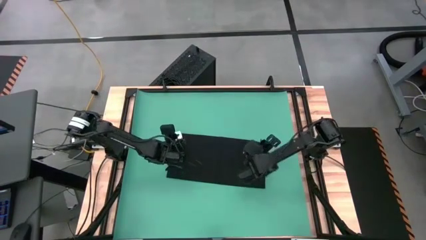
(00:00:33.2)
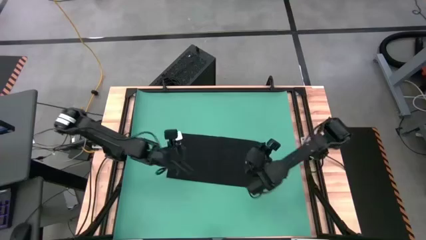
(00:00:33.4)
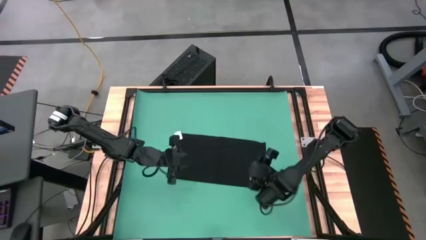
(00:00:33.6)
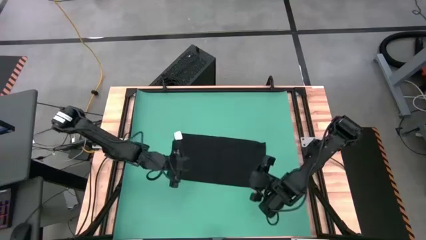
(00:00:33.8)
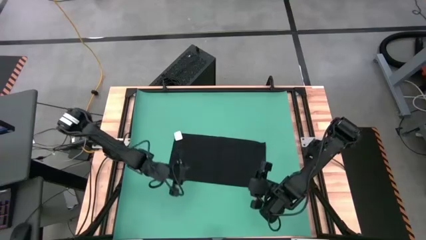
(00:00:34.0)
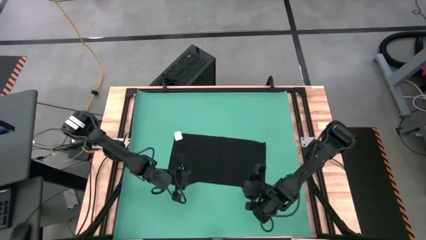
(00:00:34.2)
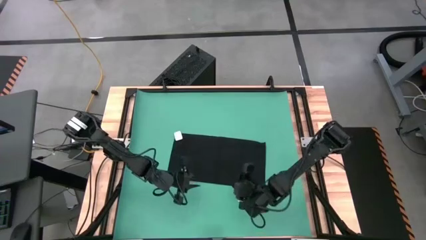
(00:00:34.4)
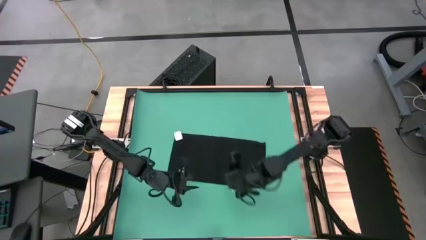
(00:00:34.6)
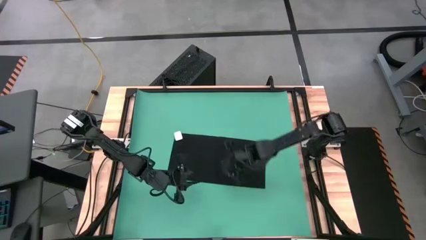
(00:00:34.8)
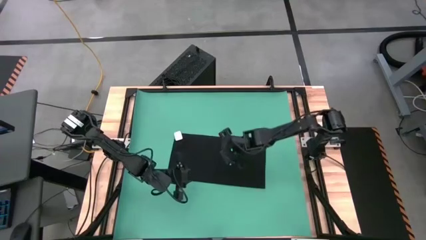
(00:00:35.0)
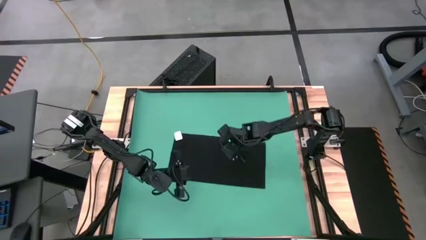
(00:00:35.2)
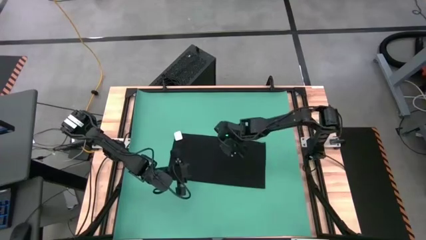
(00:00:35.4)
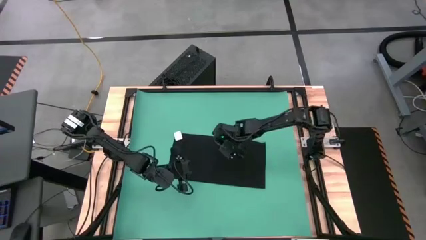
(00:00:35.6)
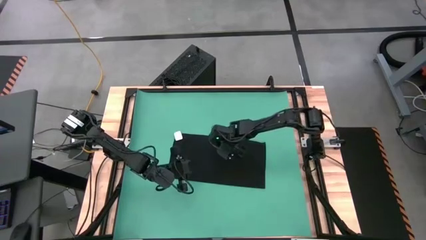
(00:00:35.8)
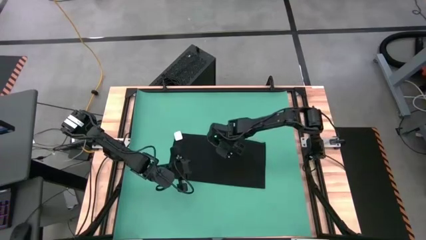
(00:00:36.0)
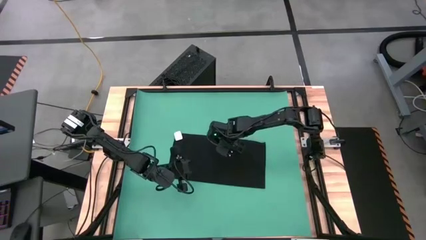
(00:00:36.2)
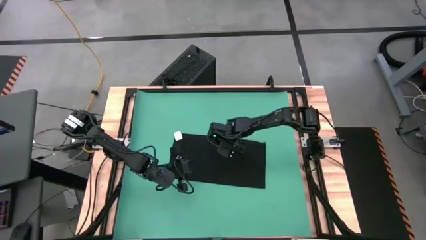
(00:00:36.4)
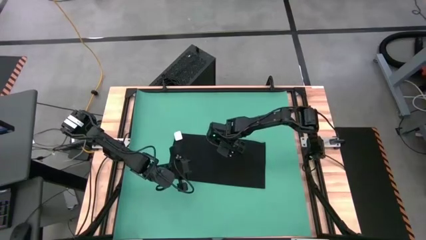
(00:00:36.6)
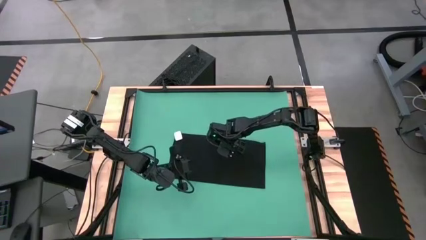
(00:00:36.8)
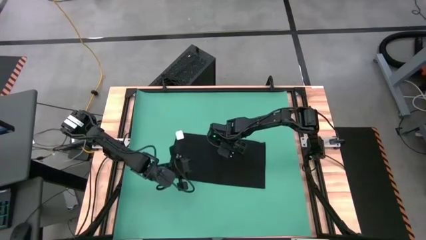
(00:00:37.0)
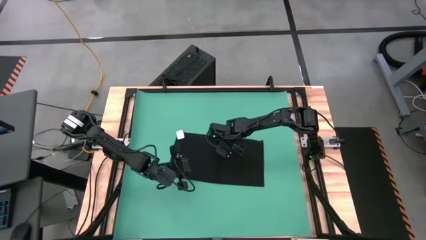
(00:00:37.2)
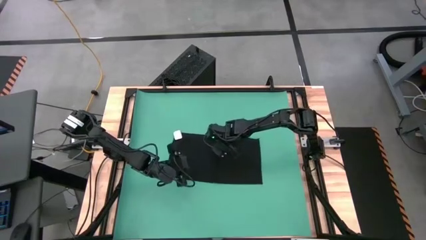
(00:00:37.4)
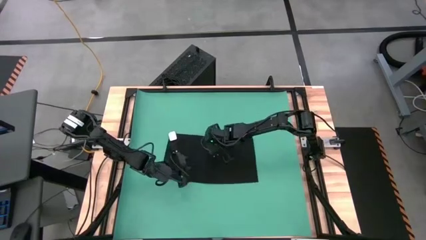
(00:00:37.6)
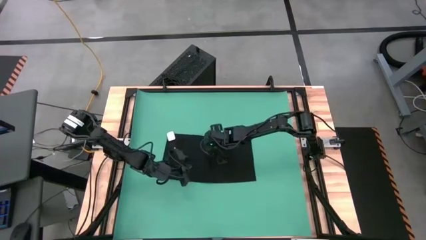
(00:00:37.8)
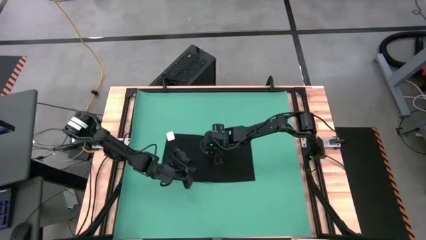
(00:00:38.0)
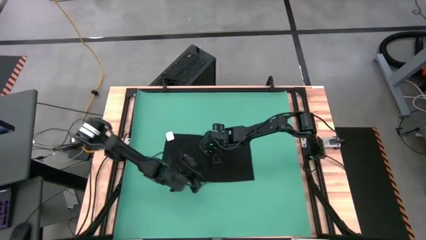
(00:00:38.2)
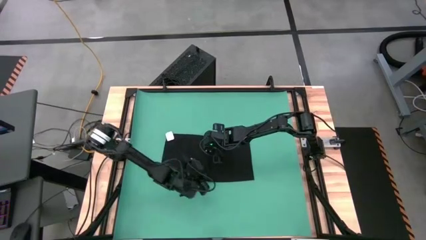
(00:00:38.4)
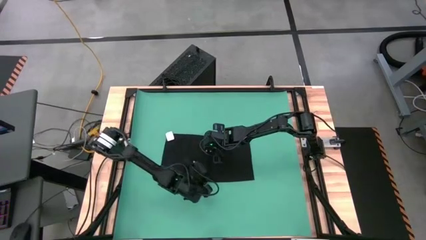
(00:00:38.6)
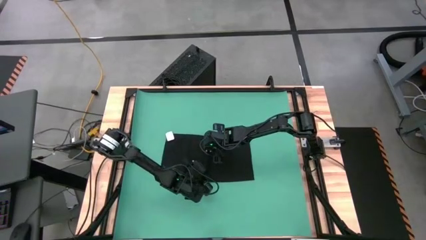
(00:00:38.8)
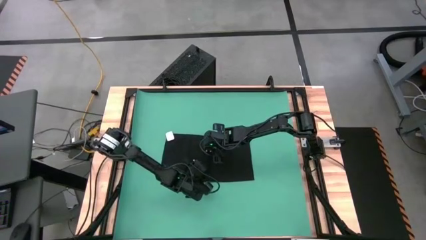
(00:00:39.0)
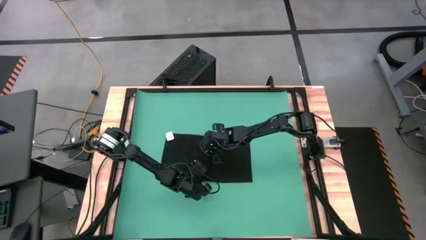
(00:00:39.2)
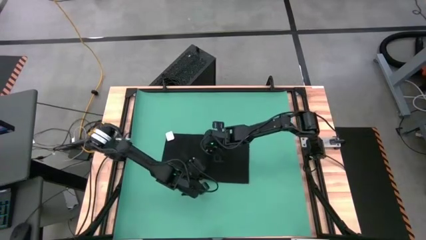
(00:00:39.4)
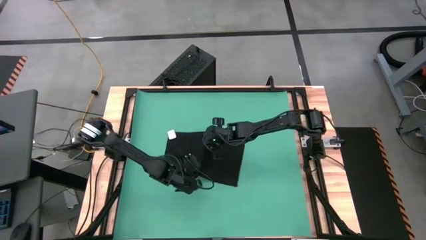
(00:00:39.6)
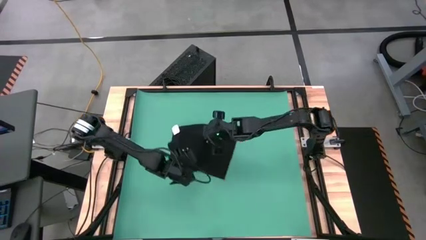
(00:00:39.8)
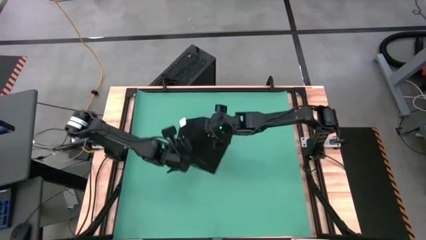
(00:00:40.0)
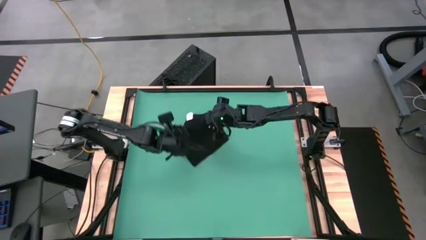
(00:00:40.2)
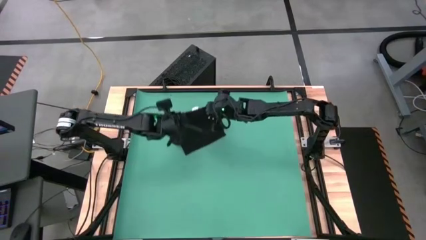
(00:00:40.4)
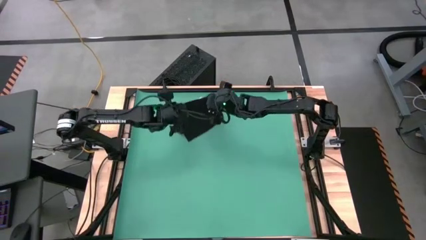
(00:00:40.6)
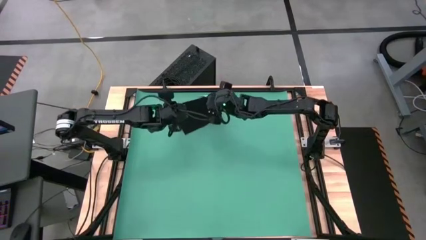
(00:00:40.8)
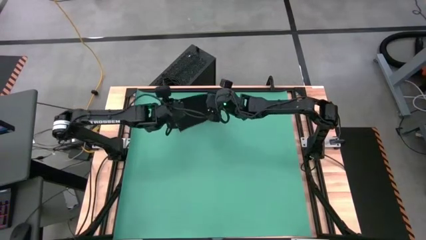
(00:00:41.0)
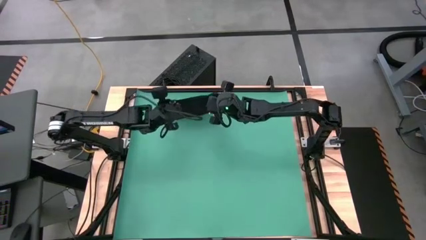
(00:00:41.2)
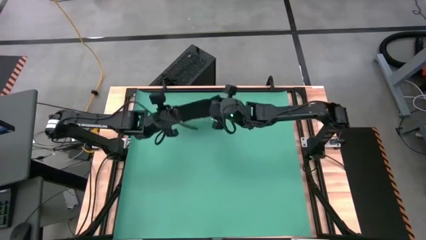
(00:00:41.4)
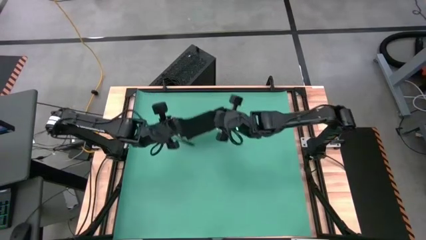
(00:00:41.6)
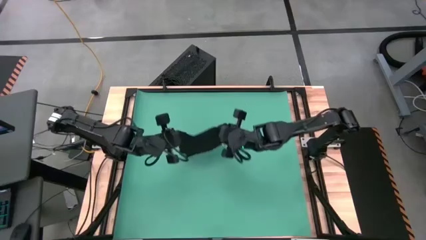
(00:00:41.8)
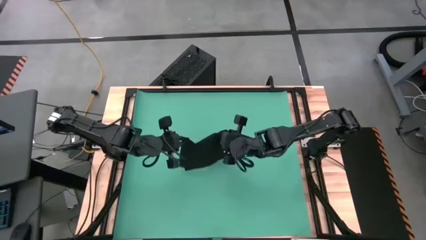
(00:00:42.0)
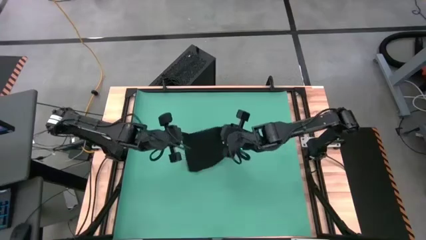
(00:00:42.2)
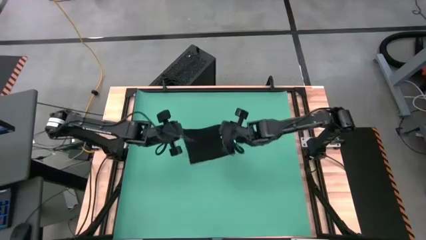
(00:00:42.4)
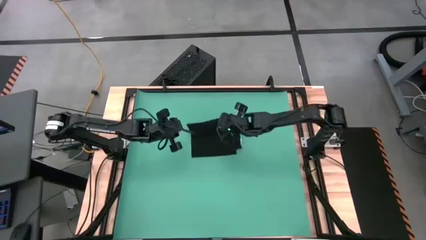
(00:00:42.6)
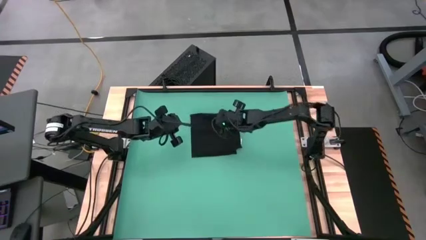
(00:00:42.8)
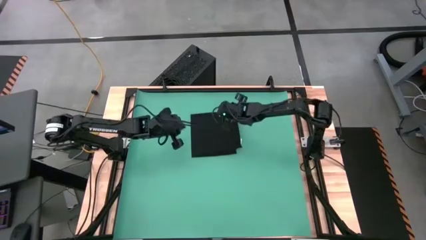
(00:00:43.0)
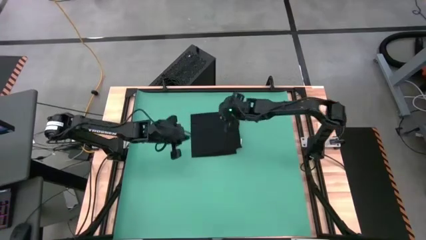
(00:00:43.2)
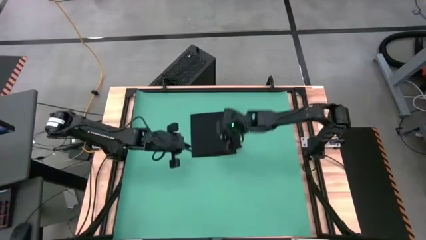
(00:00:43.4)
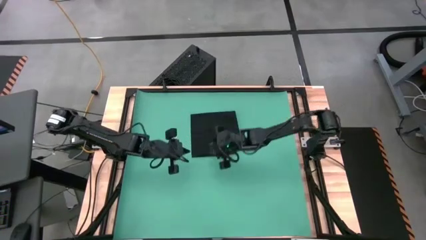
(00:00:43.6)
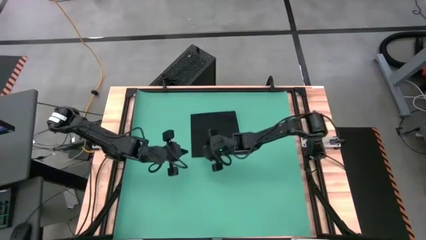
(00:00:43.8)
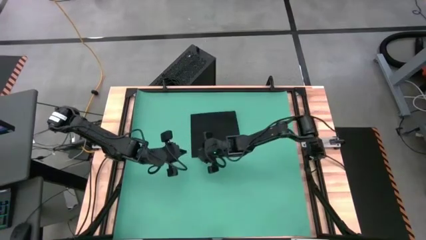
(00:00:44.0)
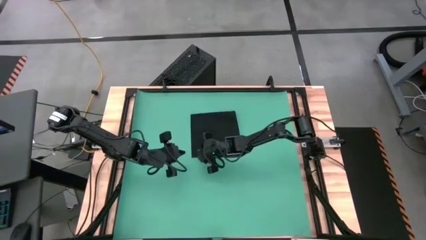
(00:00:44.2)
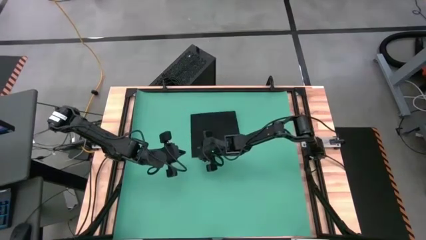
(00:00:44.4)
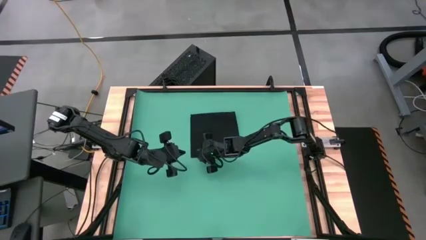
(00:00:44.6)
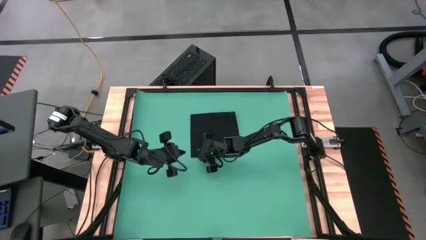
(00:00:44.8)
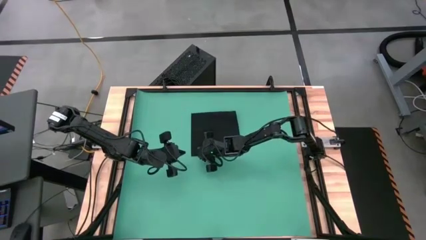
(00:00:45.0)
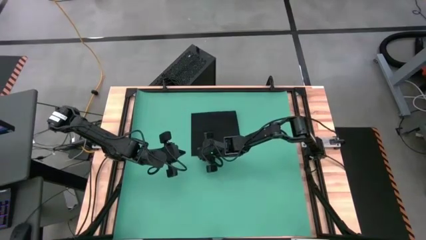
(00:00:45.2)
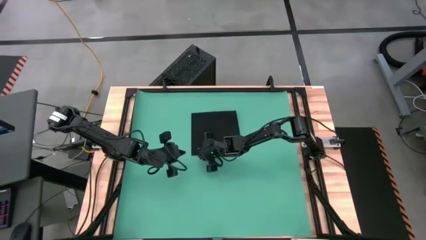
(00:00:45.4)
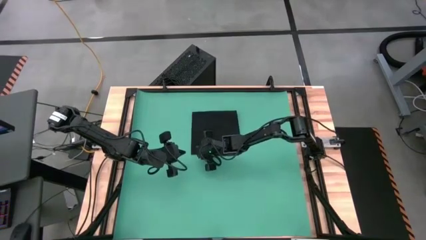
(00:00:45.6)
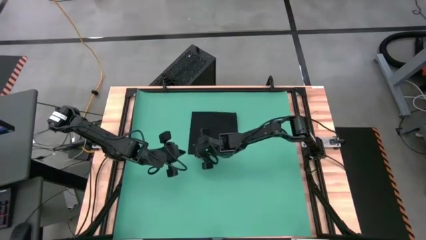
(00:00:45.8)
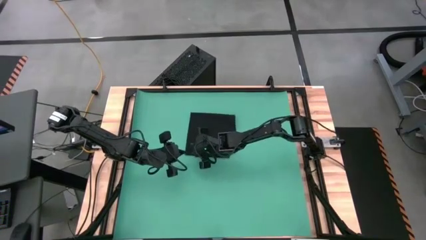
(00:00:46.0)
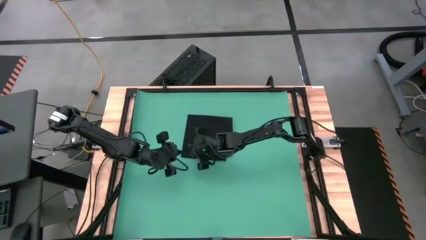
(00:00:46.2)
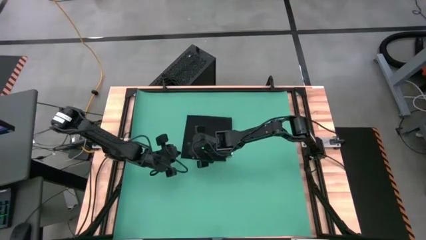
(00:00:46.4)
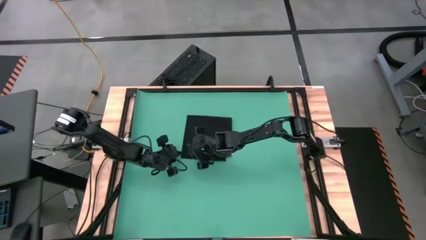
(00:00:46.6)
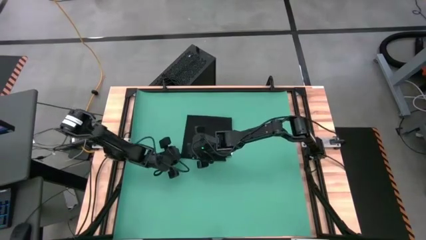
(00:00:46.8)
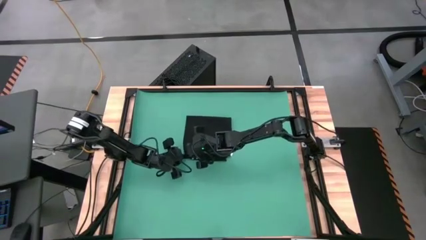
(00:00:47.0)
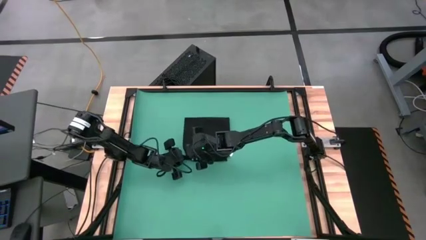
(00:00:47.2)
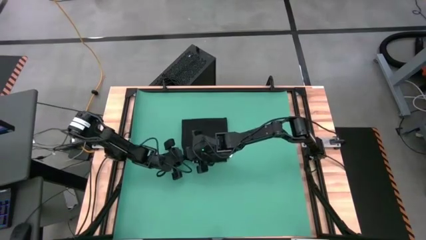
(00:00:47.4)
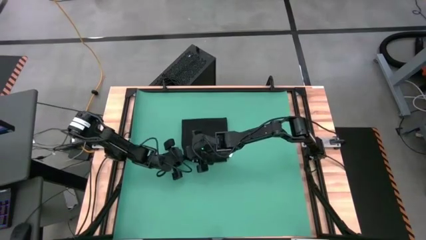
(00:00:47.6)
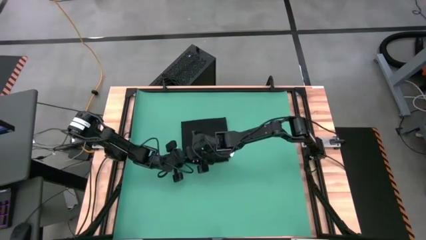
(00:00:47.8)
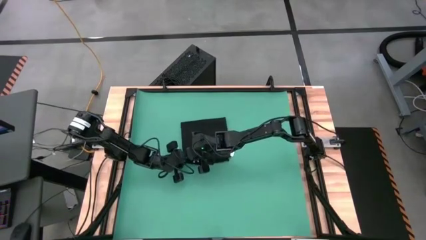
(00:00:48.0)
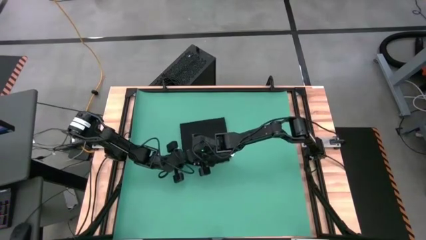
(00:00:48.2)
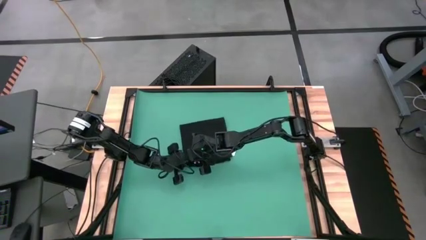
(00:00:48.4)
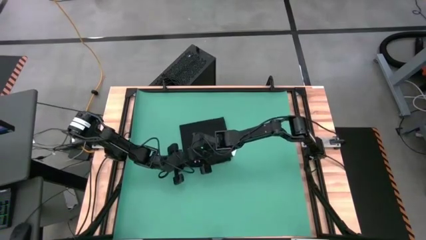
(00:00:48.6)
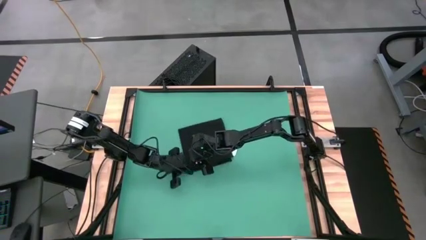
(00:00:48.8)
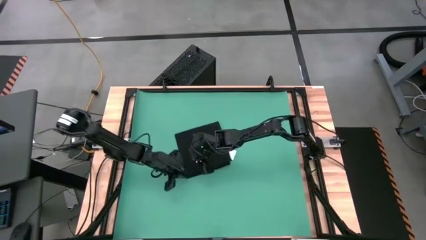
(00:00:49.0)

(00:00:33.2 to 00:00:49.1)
Task: Roll towel
Fold the brown towel

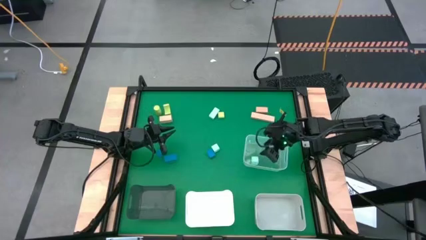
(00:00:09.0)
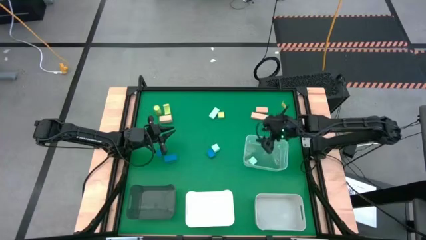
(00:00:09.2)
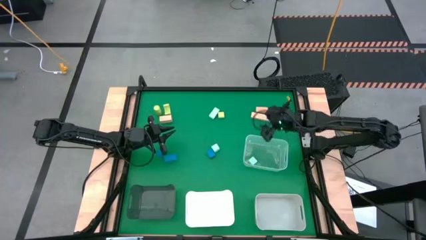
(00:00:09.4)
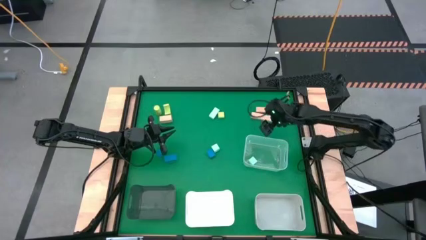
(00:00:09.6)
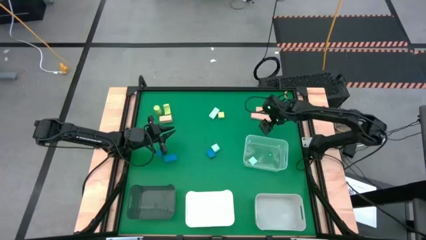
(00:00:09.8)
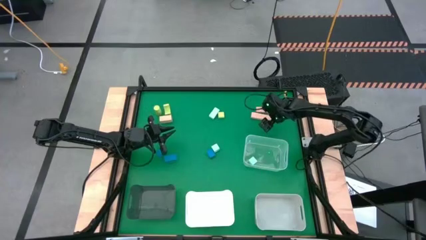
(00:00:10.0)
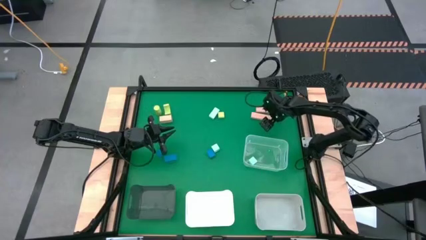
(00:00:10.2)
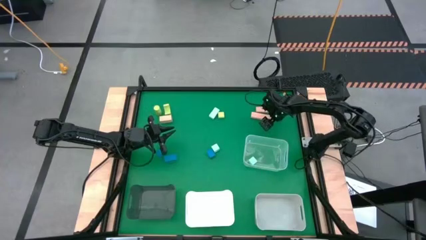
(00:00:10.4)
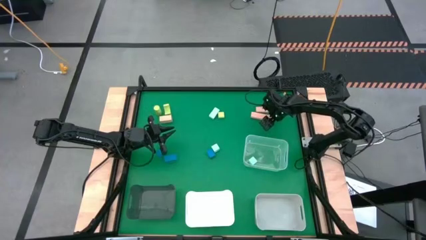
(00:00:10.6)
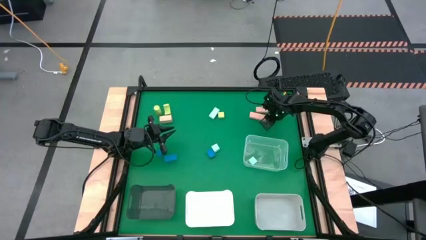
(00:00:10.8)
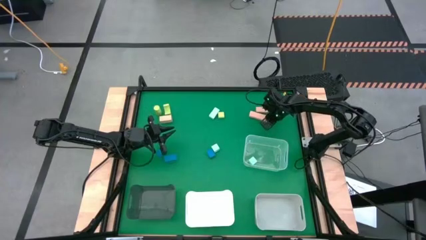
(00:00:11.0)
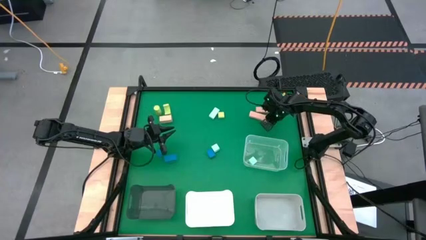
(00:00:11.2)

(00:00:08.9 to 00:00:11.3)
Task: Sort & place blocks by color
Put the bottom right brown block into the gray bin
